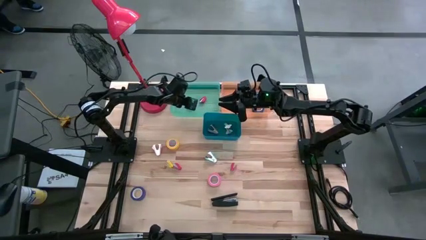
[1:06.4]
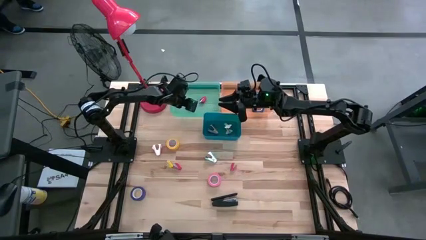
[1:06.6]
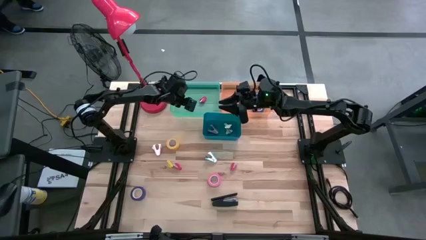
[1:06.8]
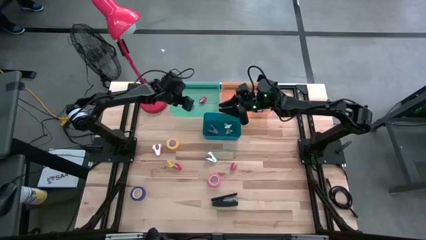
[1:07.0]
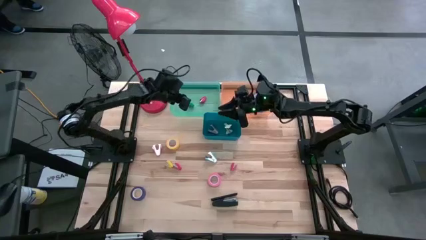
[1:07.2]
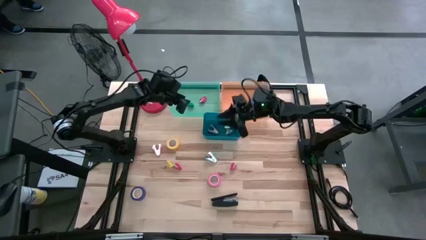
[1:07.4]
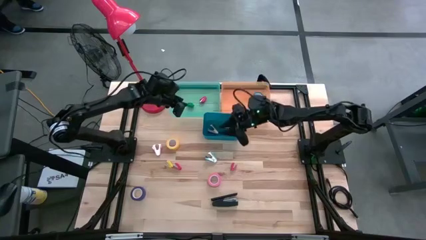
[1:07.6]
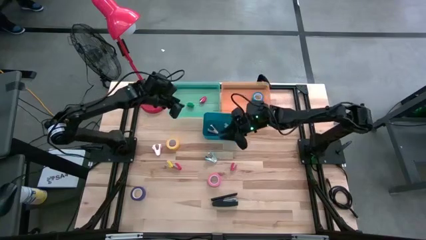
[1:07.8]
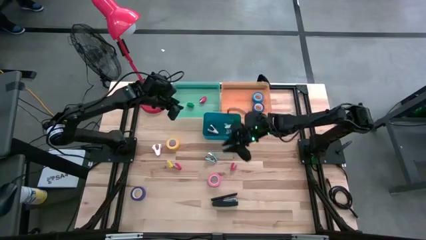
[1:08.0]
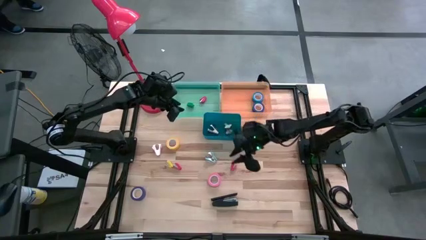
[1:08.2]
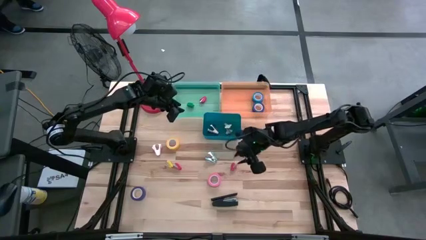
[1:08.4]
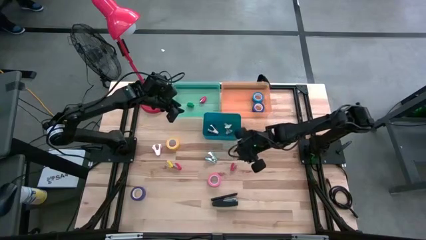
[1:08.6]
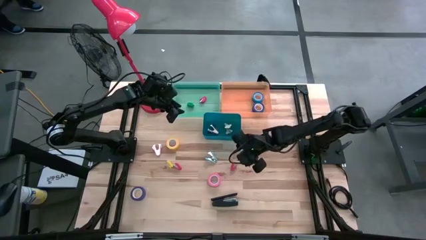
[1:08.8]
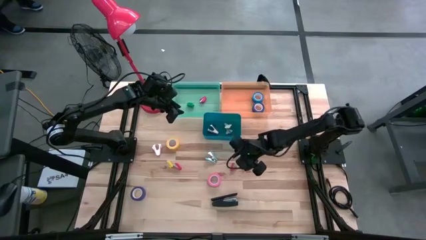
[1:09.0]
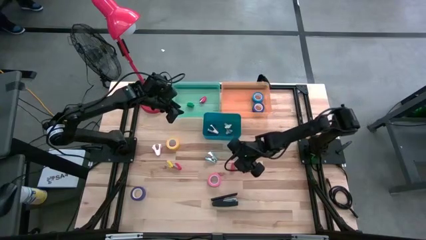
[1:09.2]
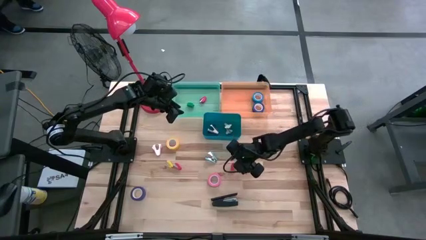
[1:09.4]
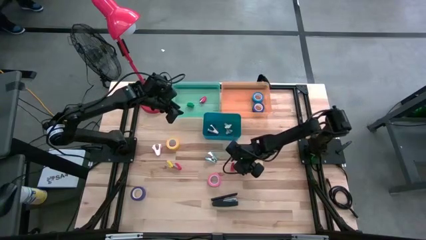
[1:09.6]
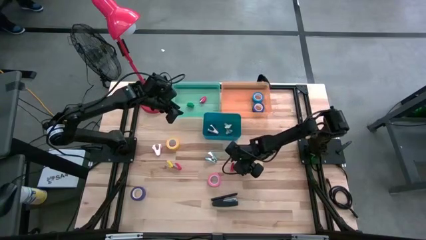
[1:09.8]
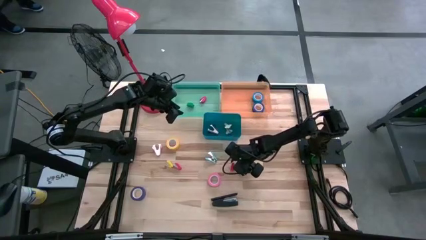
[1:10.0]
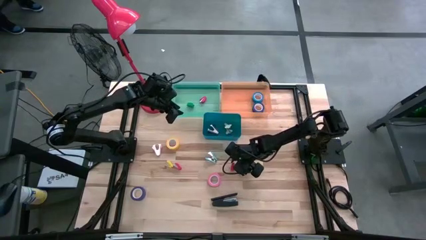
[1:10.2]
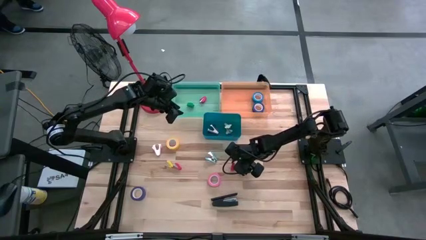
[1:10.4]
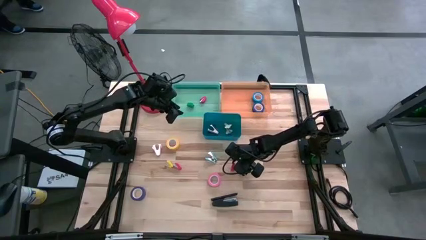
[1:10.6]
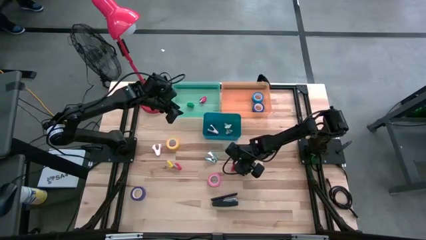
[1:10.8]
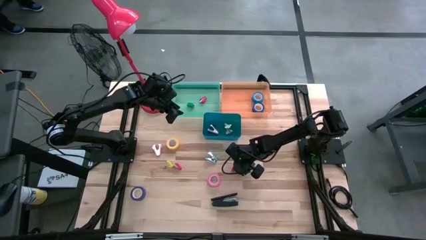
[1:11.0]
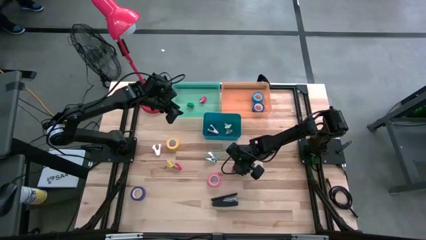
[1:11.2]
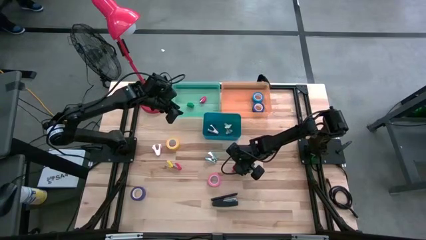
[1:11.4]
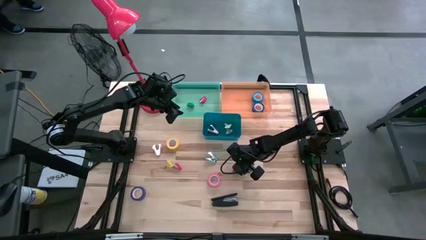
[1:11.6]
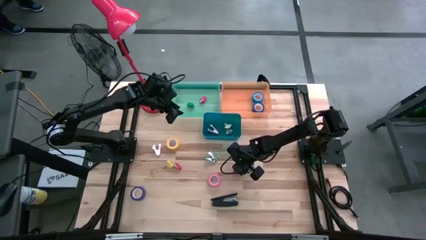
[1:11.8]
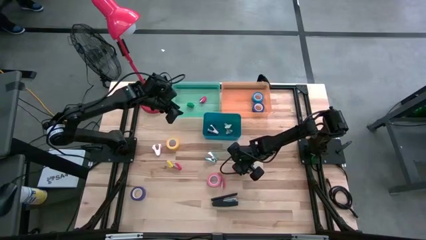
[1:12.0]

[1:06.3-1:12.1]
Task: Pick and place Stapler, Stapler remover, tape
Put the right red stapler into the green bin

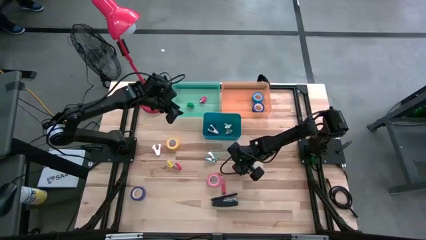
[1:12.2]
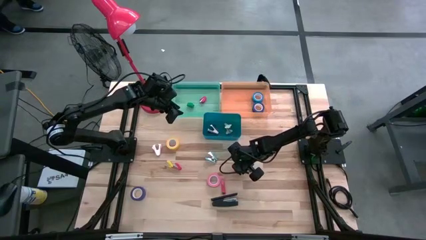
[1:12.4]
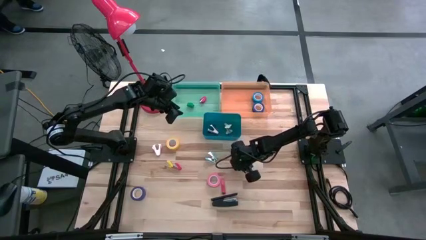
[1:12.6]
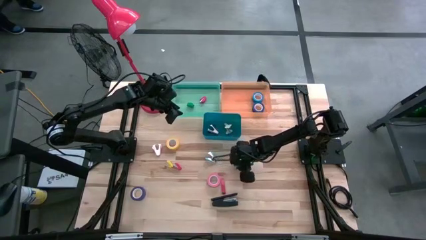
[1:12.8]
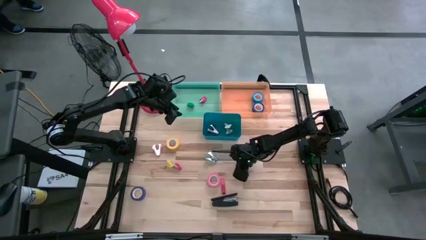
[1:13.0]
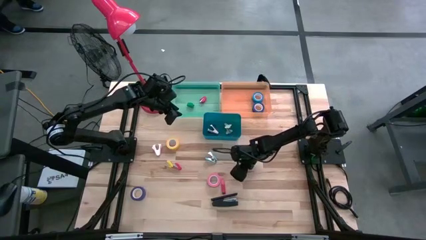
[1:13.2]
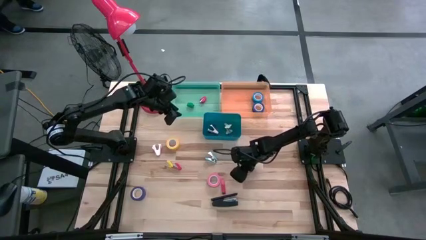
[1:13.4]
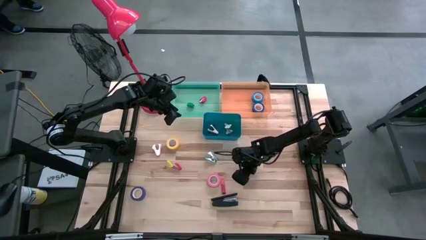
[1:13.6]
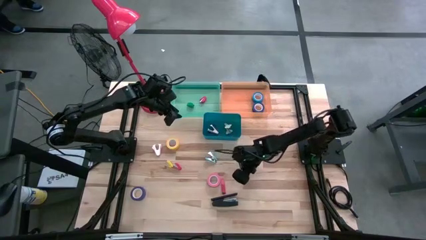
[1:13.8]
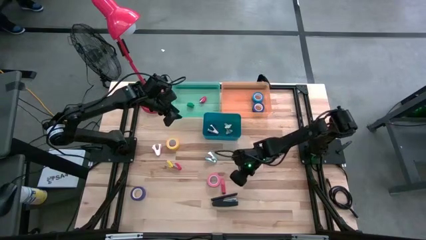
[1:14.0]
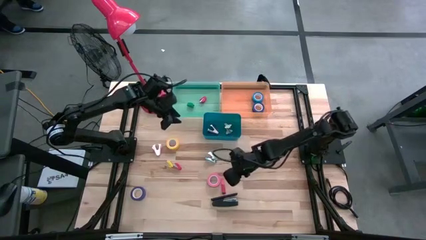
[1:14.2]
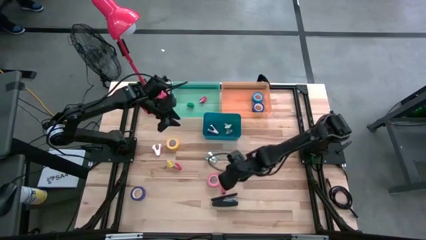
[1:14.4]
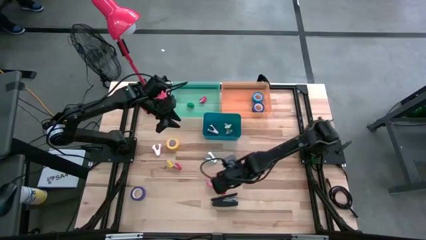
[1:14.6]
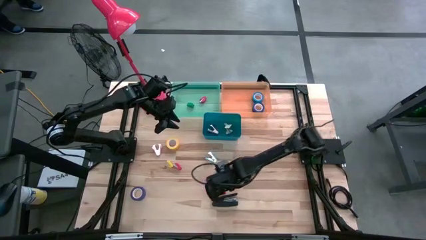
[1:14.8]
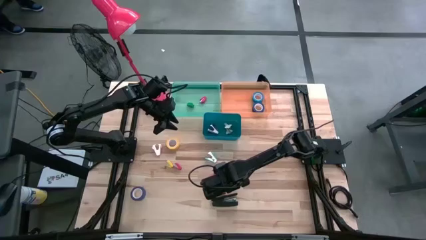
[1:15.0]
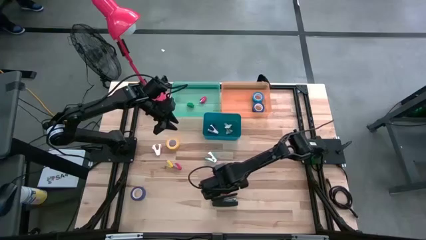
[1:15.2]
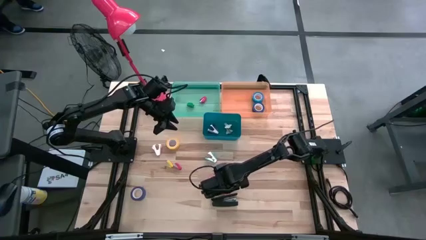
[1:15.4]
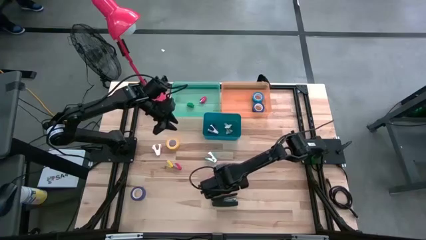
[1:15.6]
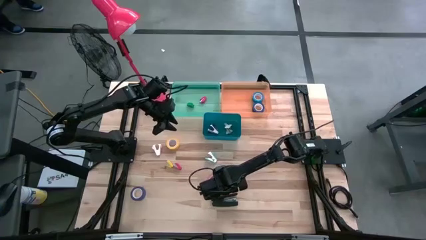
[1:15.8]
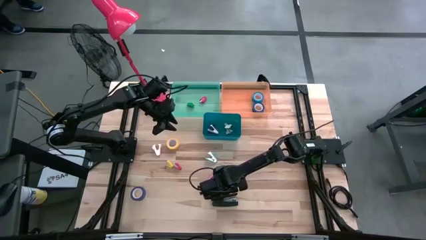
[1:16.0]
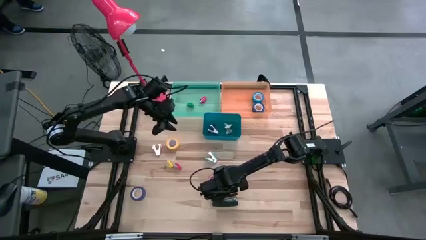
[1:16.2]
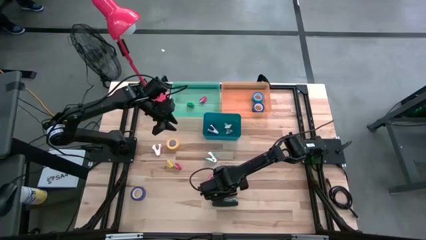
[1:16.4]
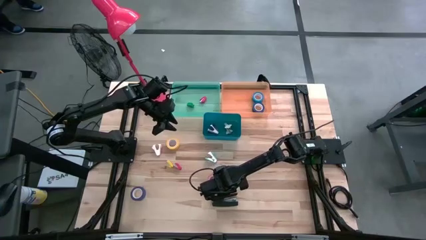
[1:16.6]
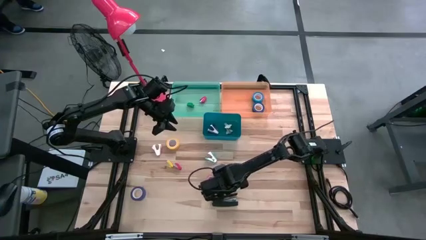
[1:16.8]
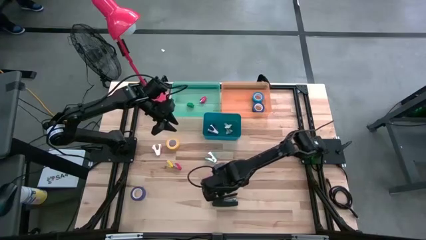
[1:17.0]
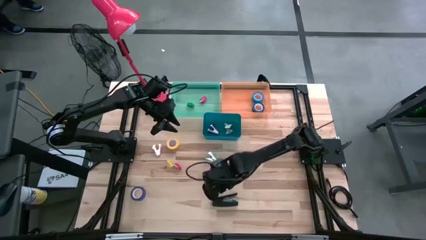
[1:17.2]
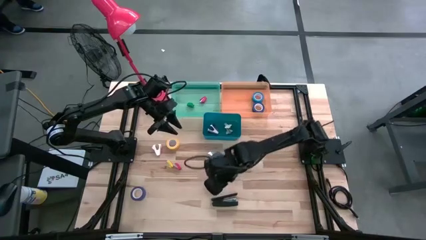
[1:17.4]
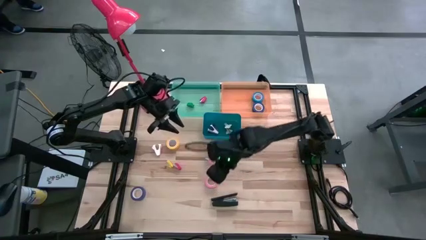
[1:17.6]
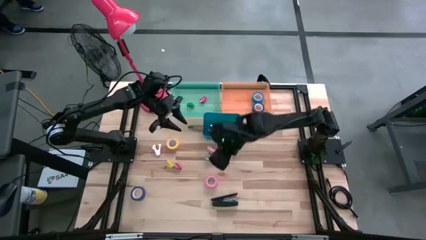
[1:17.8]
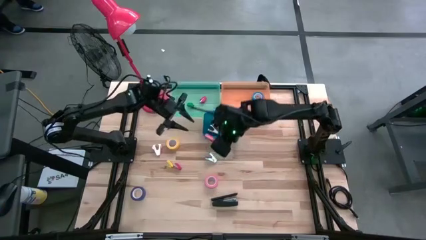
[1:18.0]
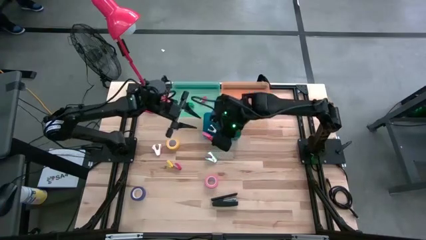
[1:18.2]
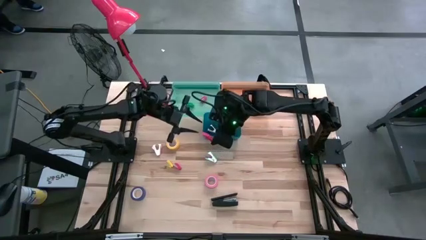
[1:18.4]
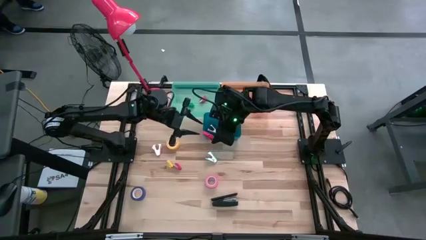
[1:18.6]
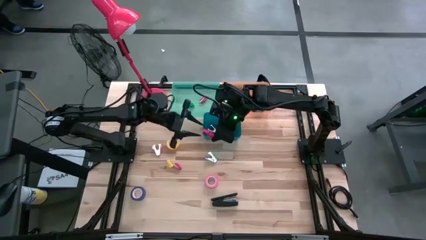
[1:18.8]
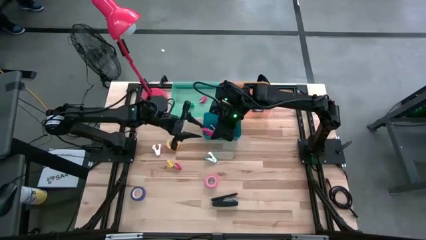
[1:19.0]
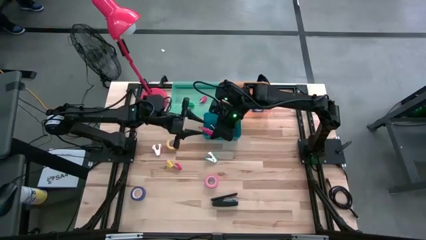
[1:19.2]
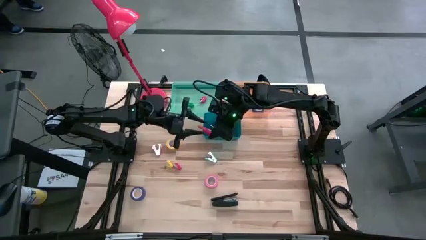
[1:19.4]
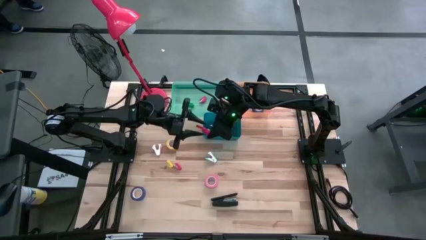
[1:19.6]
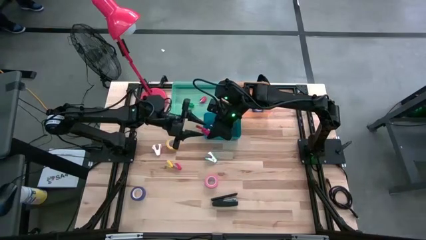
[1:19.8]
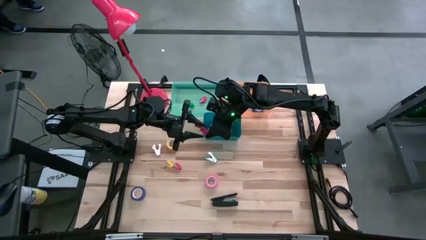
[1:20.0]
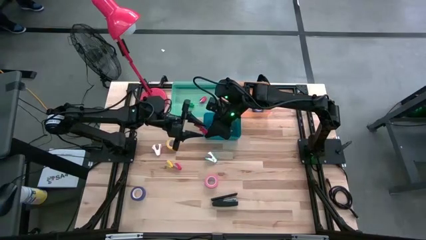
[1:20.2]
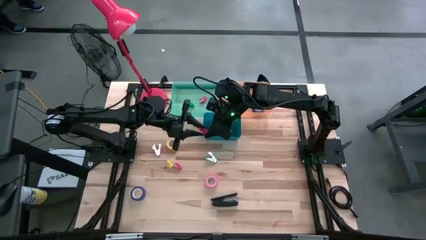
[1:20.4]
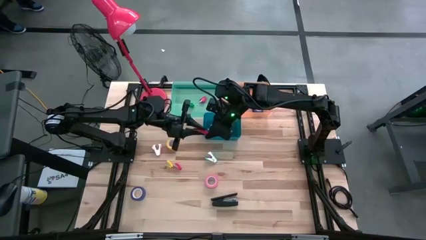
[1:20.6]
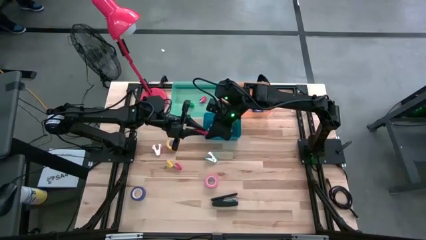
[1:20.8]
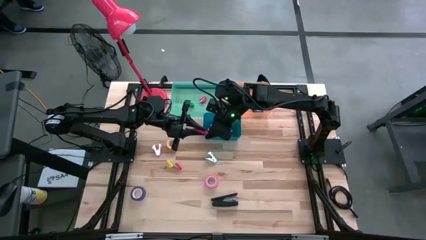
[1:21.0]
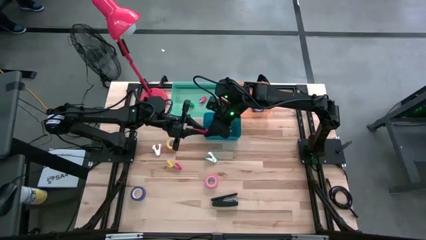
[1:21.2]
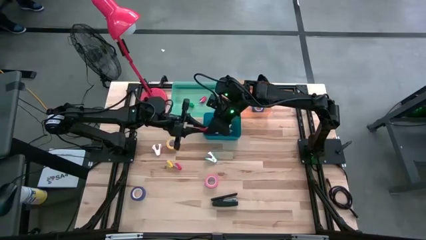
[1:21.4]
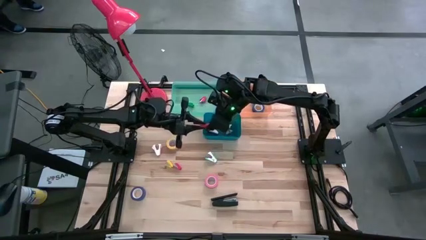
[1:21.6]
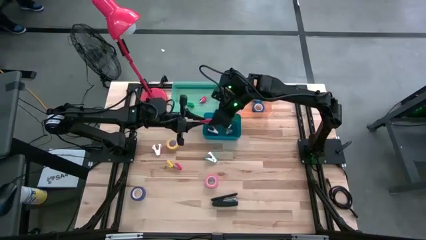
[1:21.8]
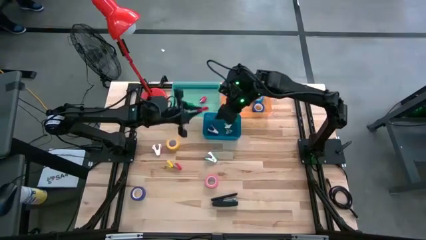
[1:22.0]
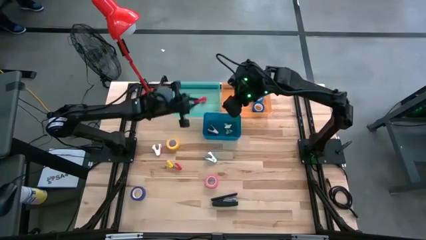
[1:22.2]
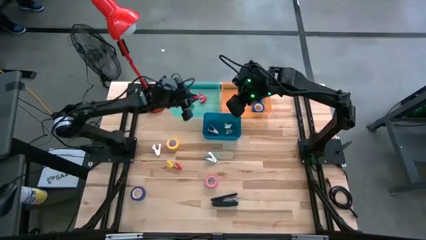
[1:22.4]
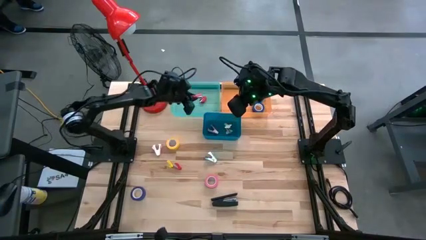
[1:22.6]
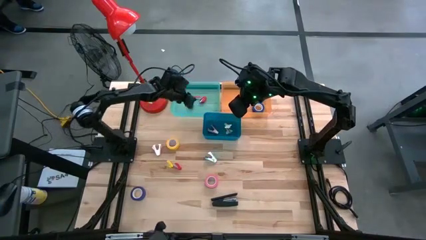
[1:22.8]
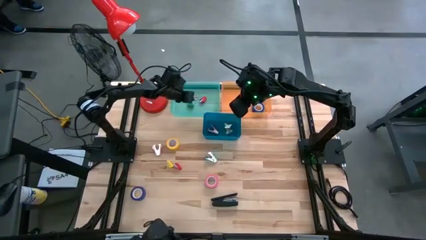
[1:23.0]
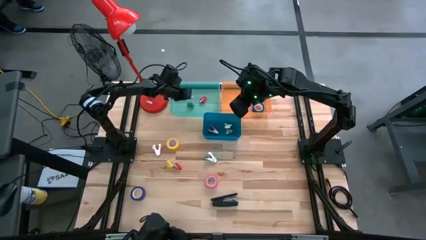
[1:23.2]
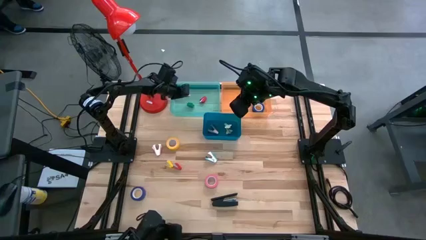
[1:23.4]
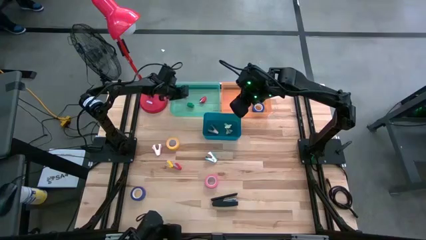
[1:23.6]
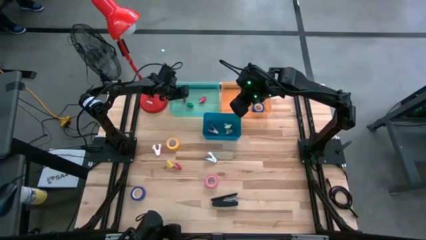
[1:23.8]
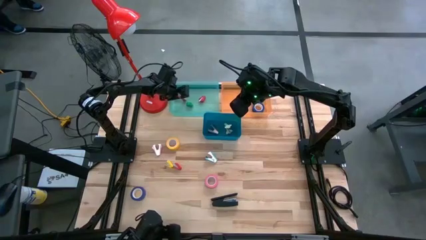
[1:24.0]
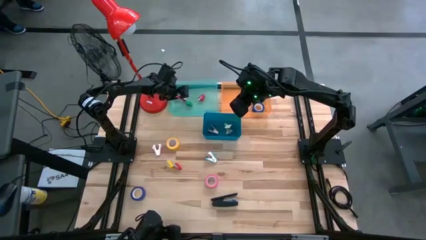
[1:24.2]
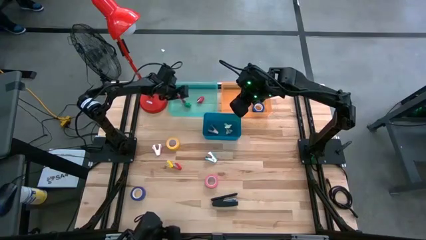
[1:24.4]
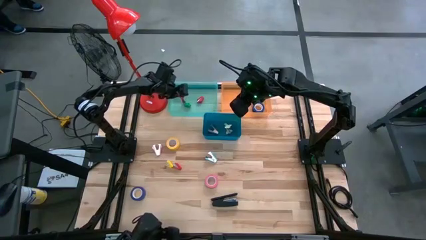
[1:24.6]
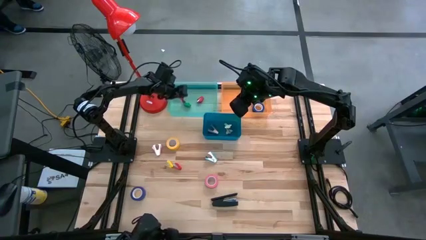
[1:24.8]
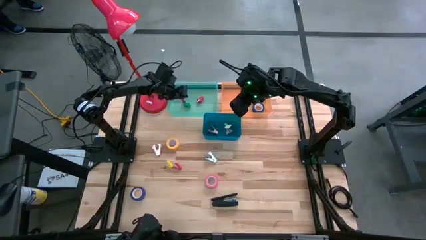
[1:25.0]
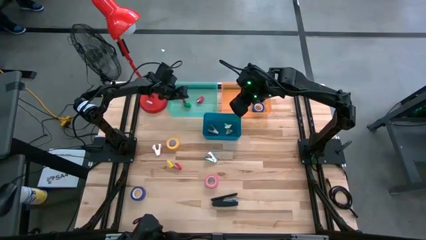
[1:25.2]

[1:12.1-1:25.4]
Put the right red stapler into the green bin
